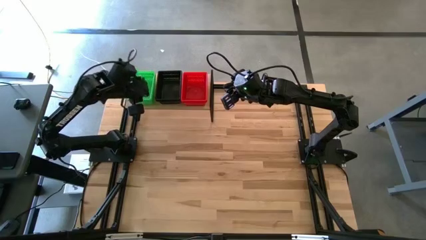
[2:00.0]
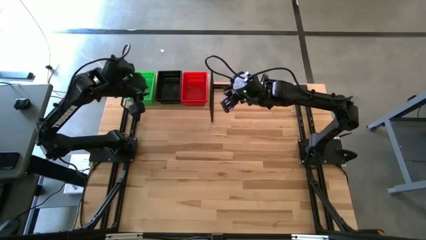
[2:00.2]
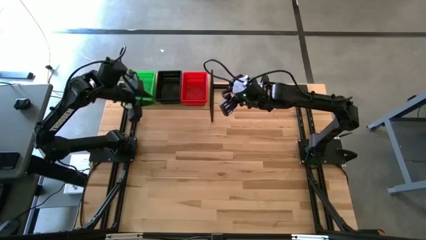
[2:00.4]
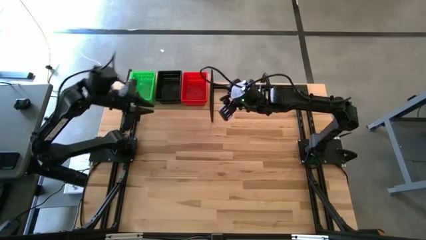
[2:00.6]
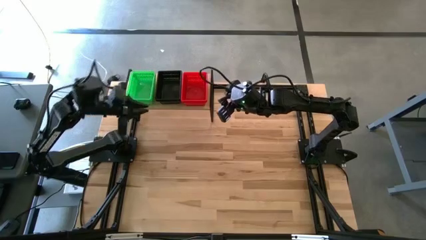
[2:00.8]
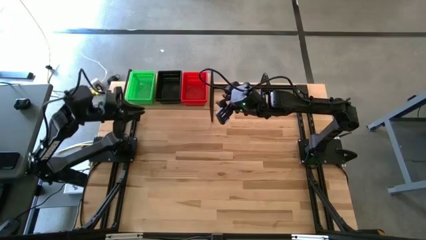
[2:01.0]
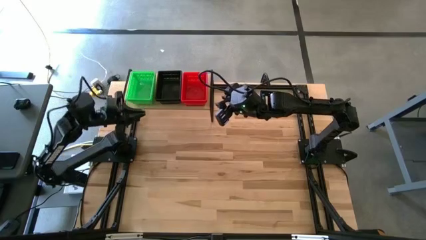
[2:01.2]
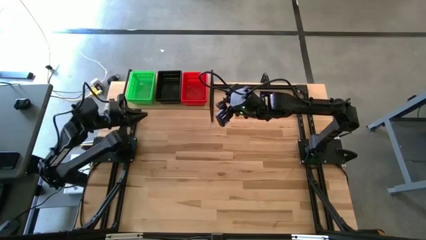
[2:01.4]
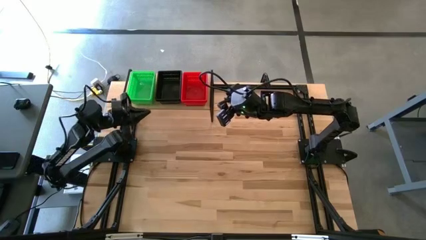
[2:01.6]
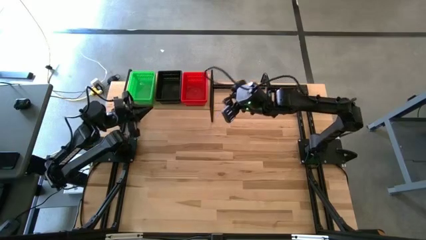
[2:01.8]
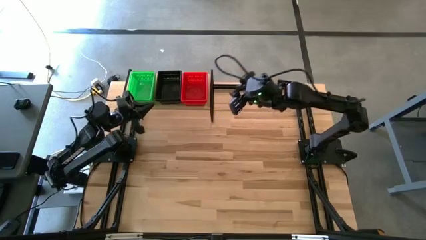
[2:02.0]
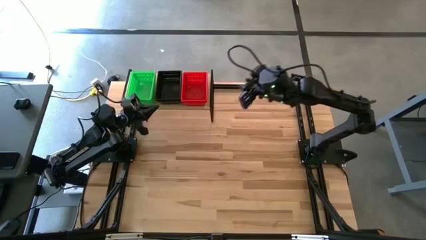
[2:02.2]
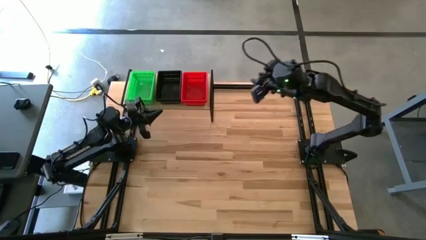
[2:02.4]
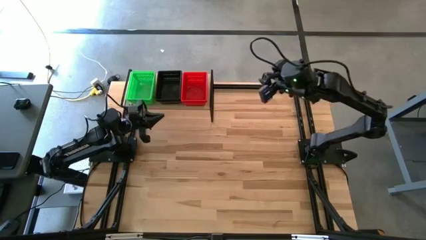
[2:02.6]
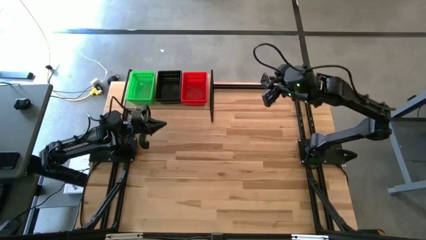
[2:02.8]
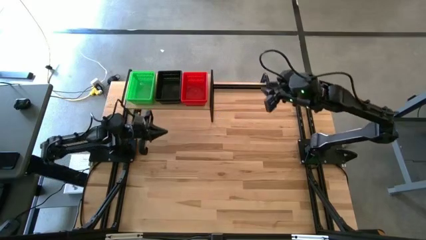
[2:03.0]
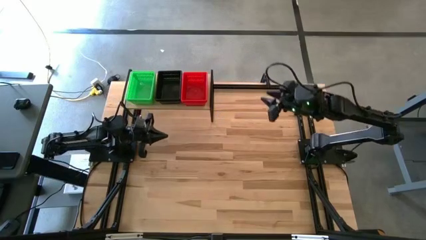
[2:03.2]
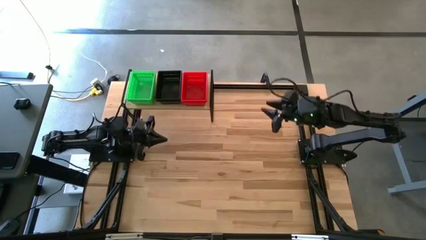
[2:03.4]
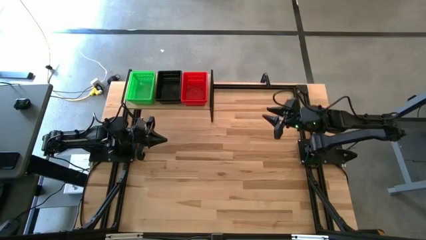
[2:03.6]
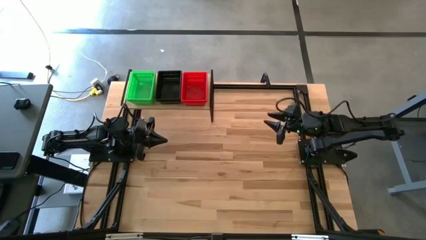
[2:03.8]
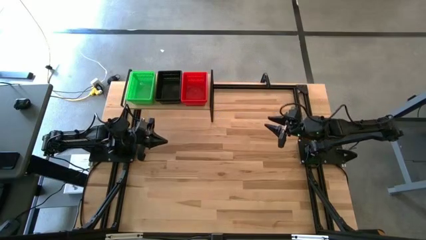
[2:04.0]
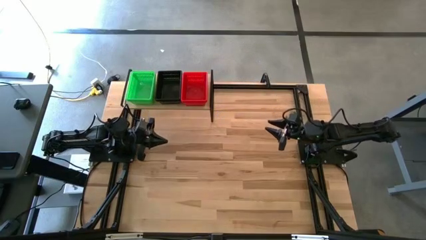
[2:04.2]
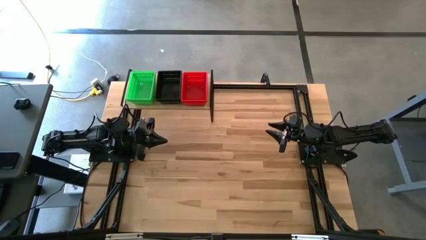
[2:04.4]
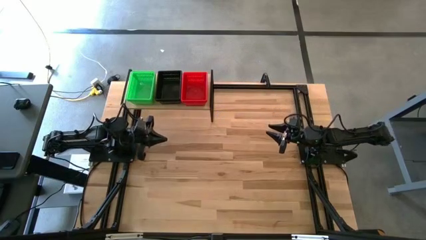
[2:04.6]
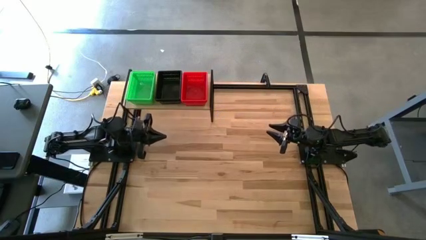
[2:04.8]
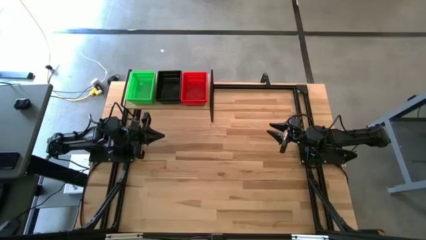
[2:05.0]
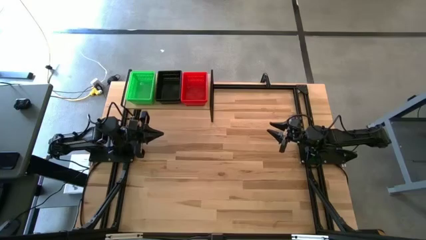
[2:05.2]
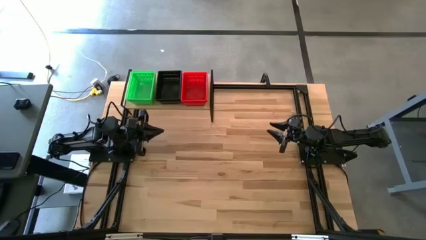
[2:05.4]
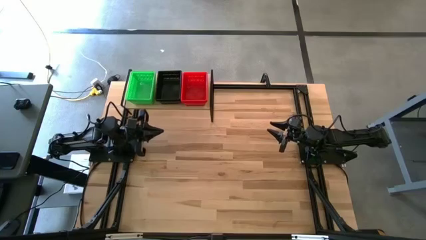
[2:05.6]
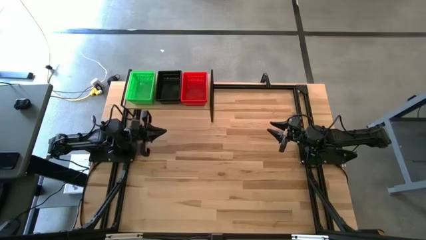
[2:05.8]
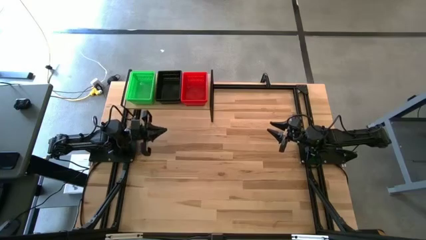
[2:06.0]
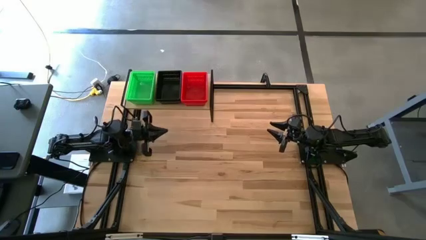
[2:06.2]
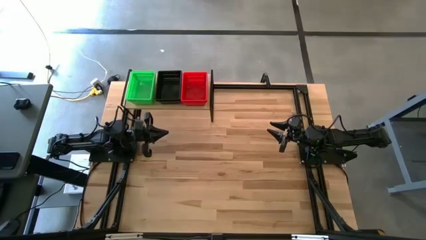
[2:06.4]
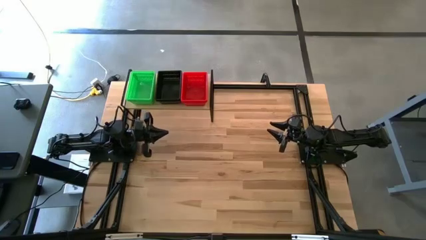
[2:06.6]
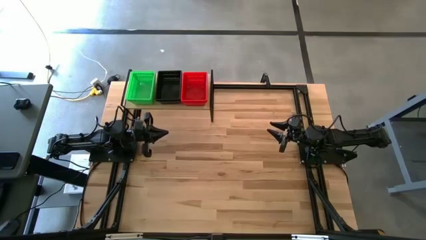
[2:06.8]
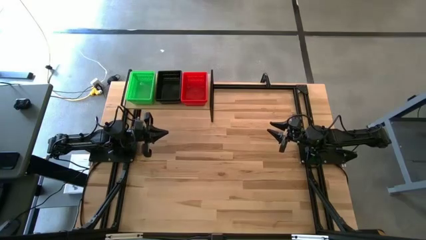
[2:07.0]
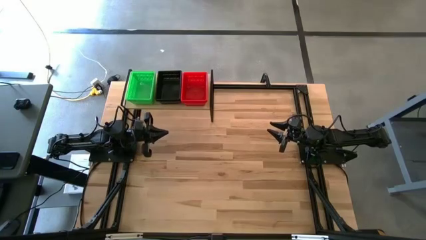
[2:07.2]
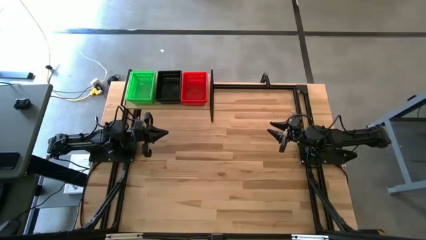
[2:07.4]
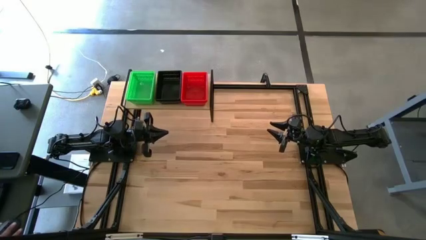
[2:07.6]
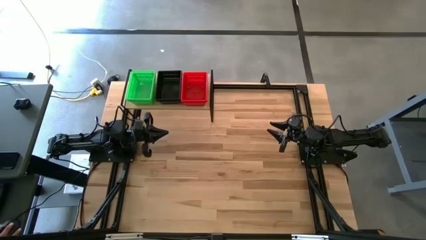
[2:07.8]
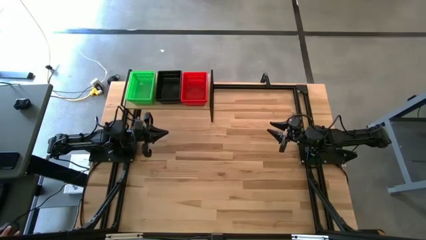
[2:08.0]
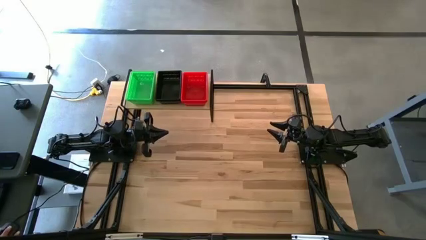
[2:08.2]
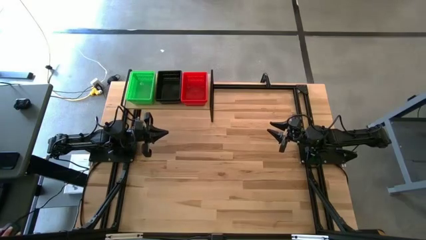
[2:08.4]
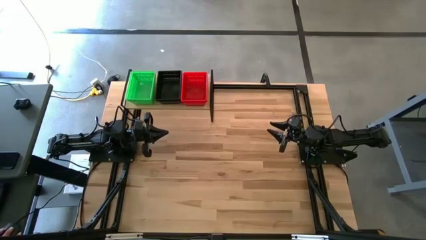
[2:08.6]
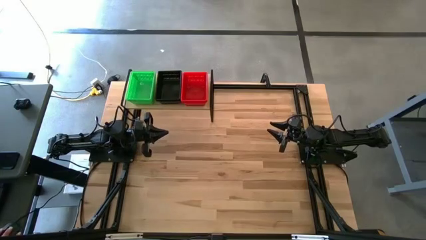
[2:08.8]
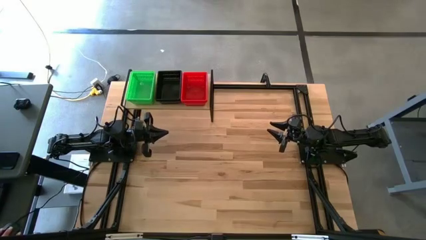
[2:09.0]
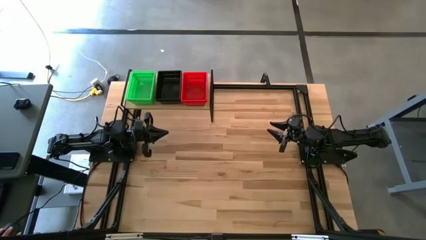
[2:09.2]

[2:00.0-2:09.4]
Task: Stack baskets on shelf by color
Return to Home Position

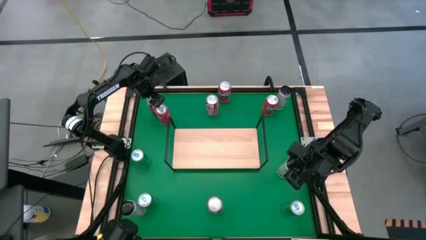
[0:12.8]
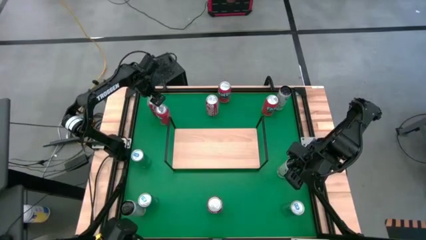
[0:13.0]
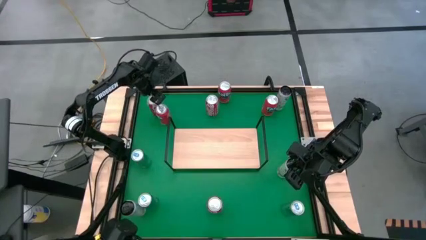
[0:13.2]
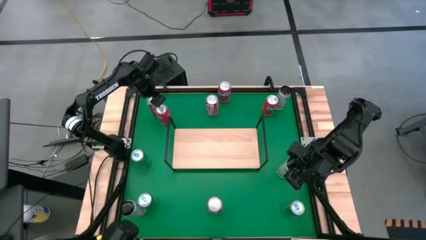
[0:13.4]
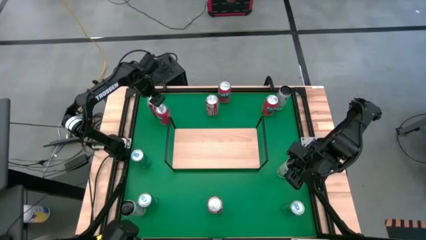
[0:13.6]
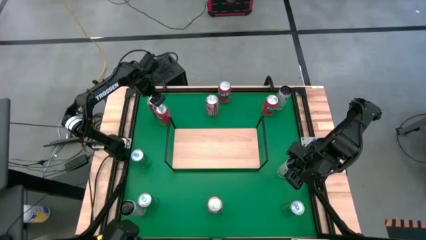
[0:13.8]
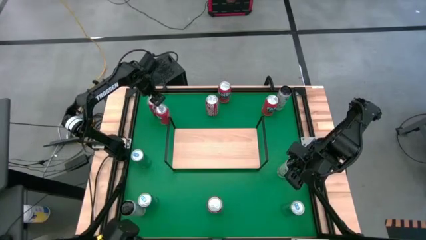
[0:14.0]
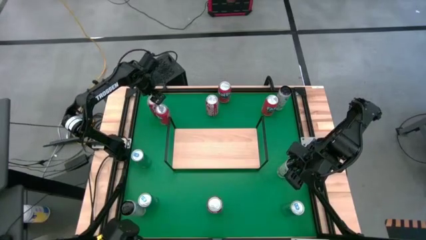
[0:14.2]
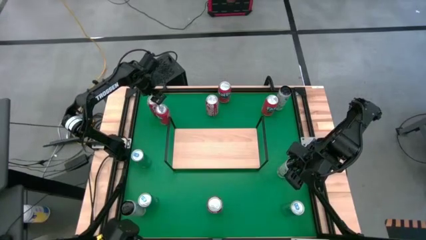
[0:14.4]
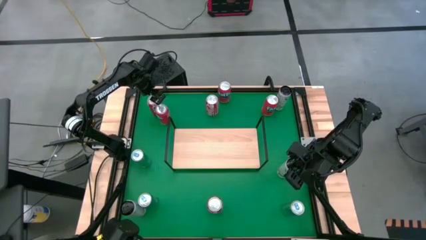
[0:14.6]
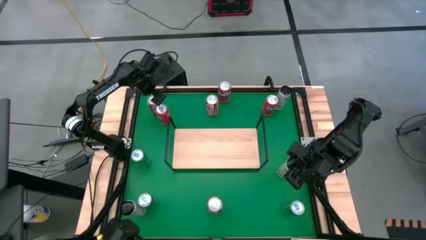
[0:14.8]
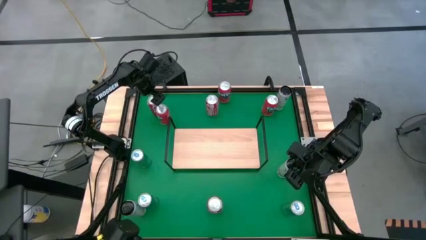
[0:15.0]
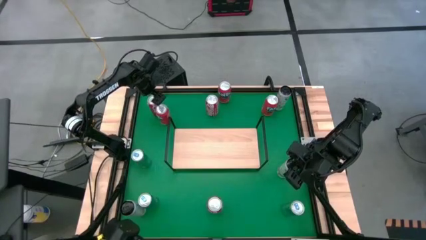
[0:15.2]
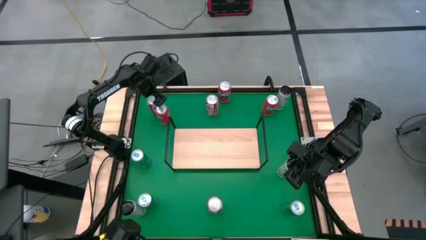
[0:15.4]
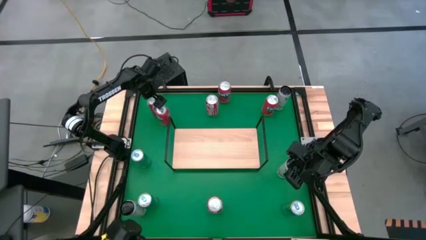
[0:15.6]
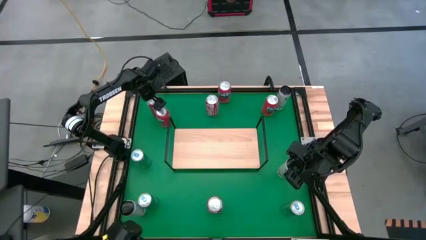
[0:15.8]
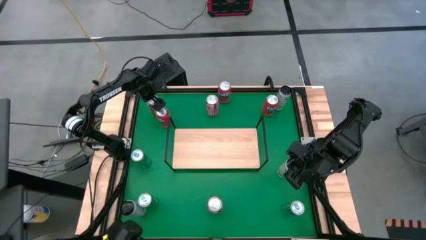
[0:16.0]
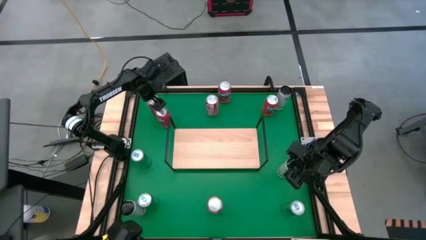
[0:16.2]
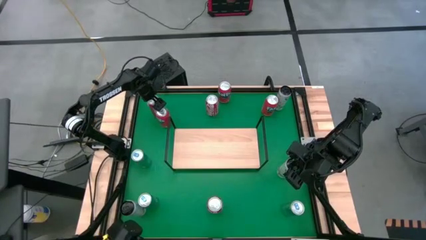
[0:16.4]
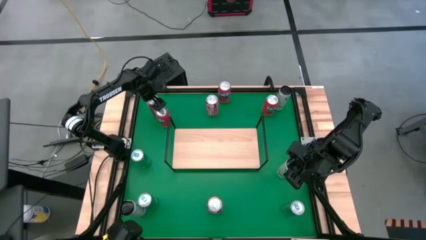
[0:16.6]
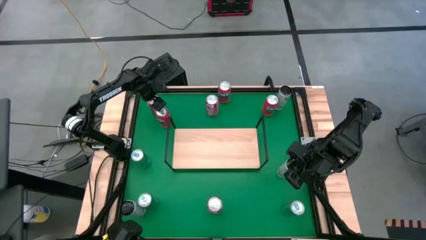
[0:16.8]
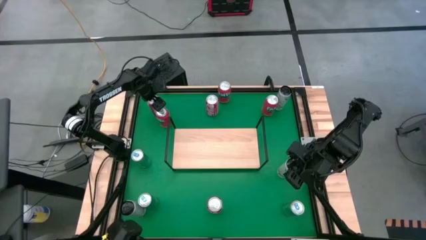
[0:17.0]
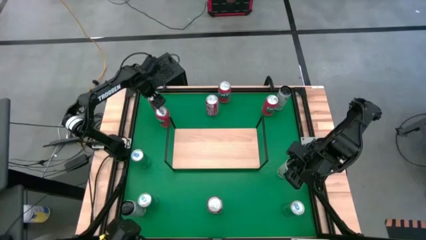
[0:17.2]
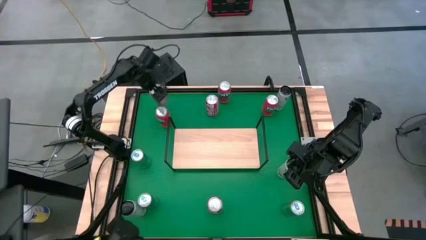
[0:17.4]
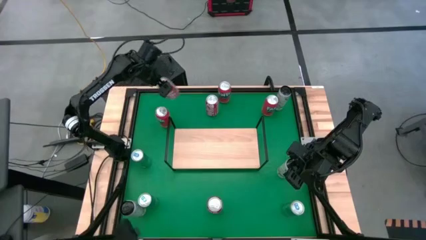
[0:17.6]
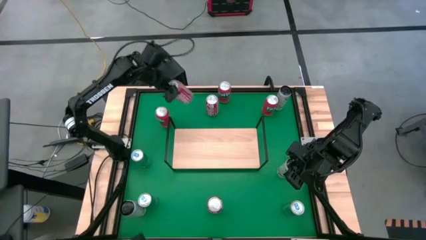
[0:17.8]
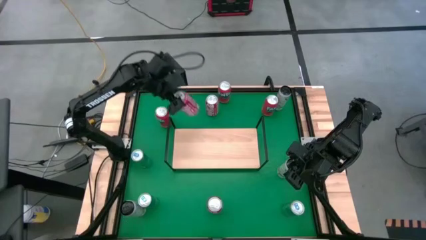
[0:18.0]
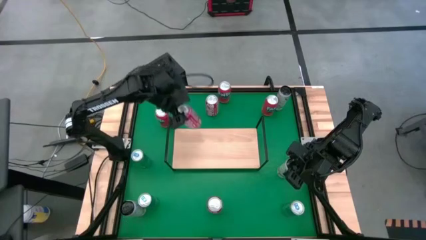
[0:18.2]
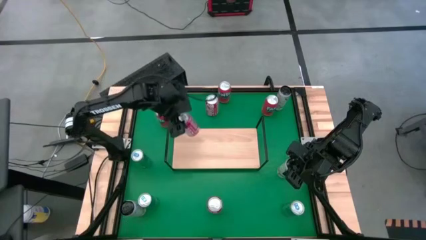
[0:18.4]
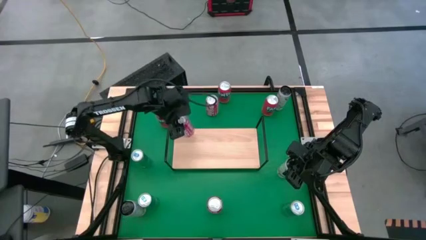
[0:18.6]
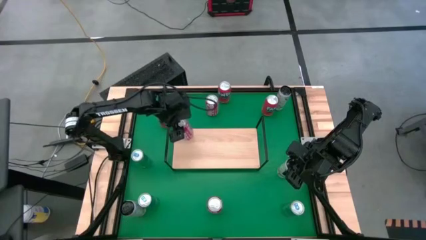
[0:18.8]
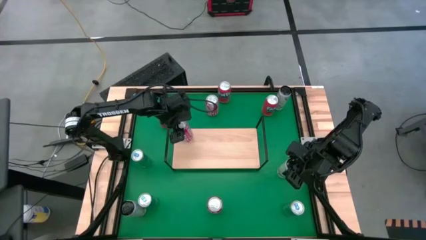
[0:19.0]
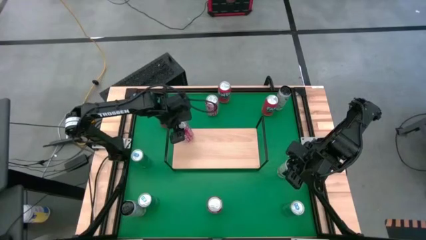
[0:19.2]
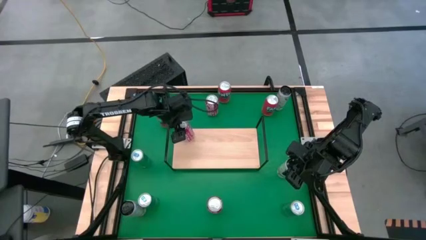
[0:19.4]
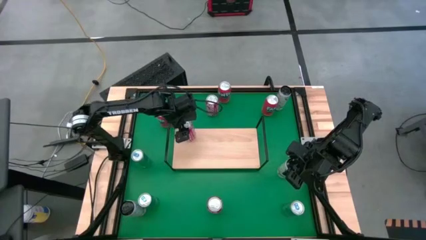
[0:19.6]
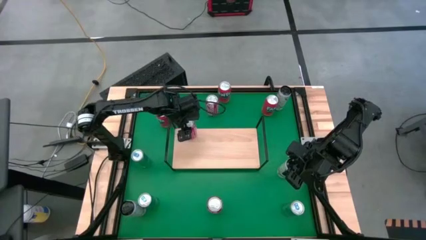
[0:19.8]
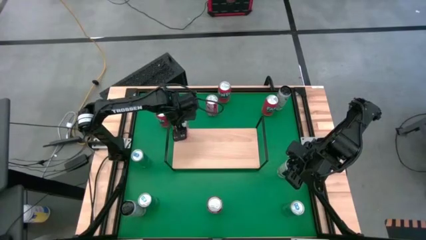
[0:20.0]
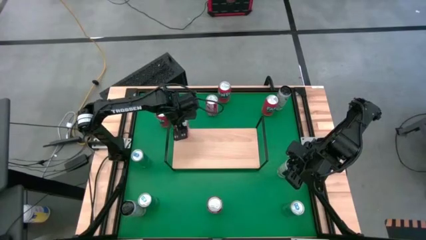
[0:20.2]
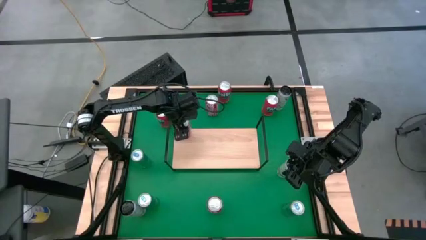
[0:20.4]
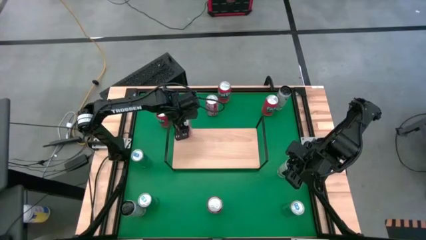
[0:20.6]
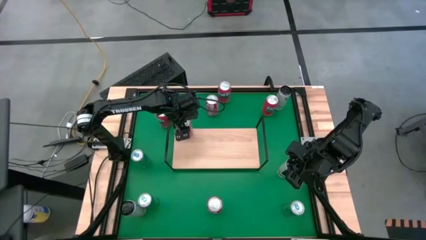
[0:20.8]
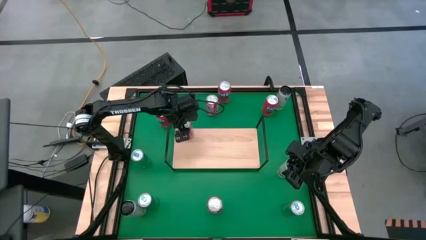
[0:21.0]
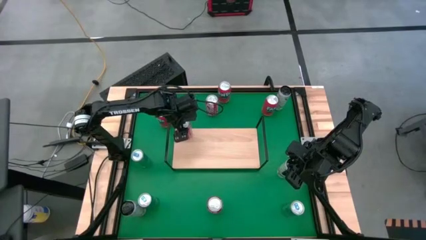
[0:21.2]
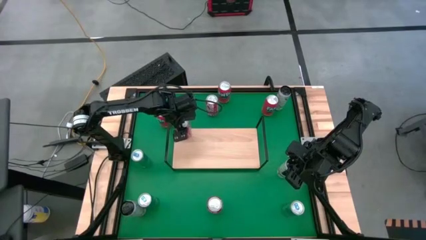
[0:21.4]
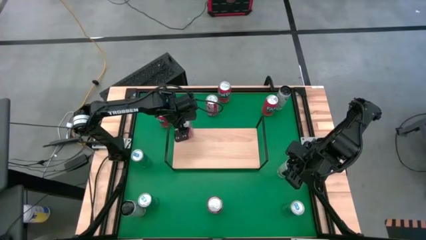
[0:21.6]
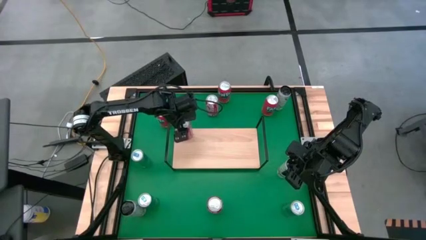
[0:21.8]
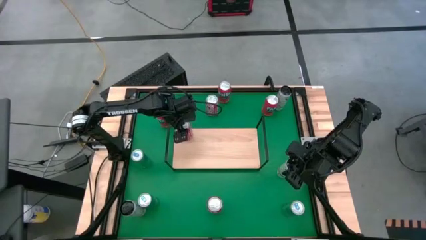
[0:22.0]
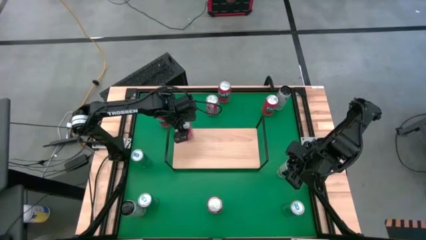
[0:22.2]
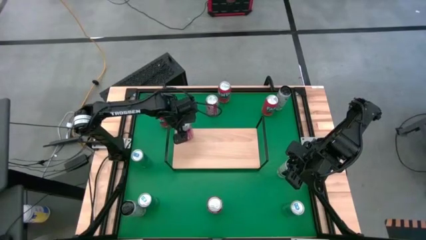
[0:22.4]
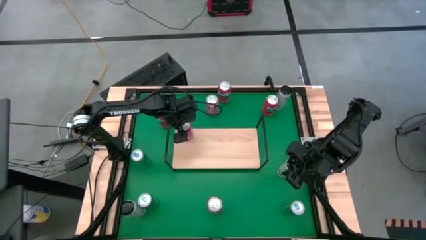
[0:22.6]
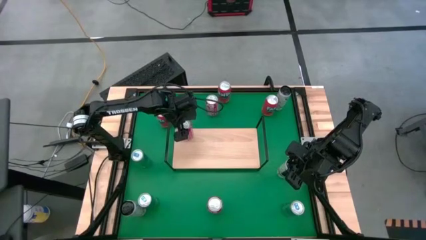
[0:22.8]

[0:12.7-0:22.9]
Task: Place canned beverage on shelf
Put the top left red and white soda can on the shelf
